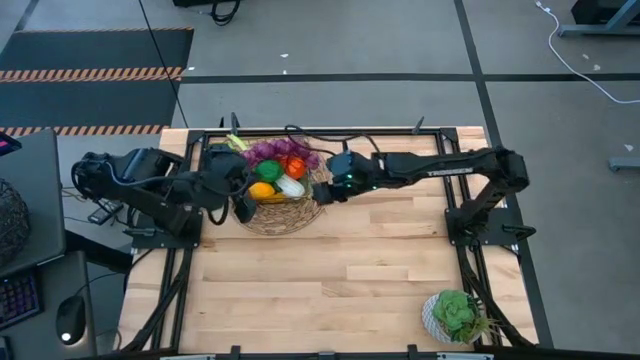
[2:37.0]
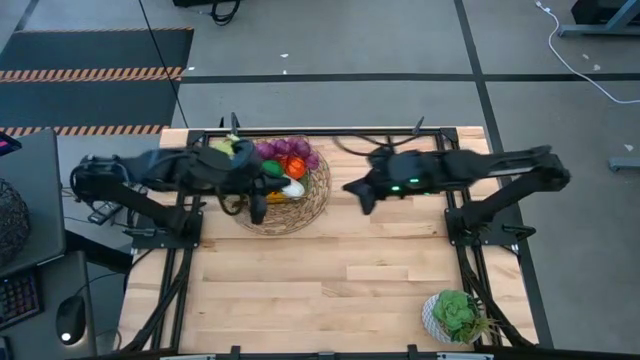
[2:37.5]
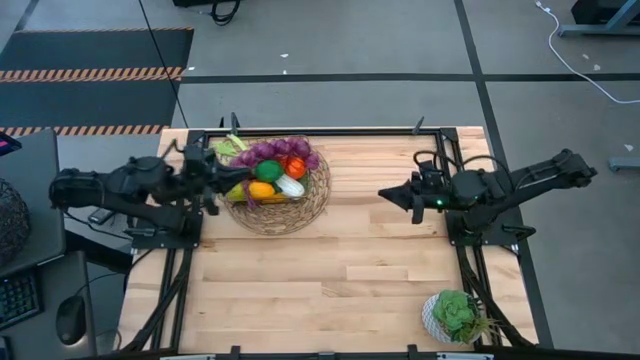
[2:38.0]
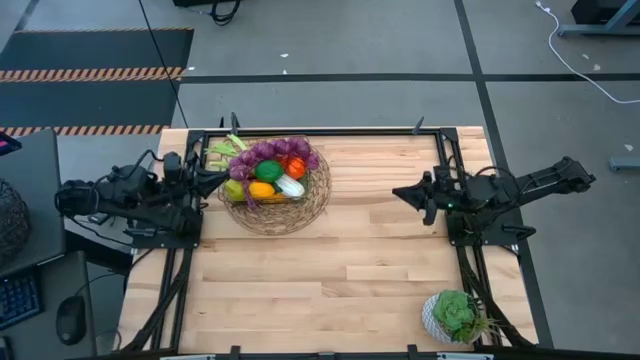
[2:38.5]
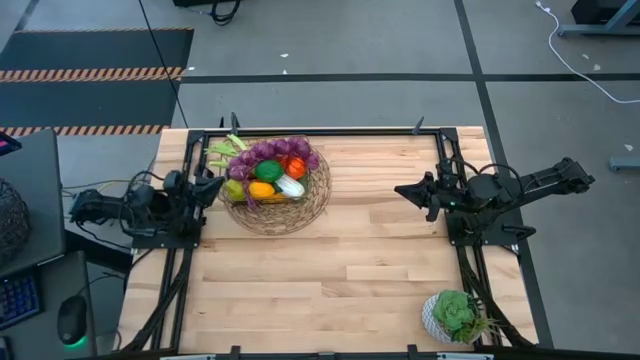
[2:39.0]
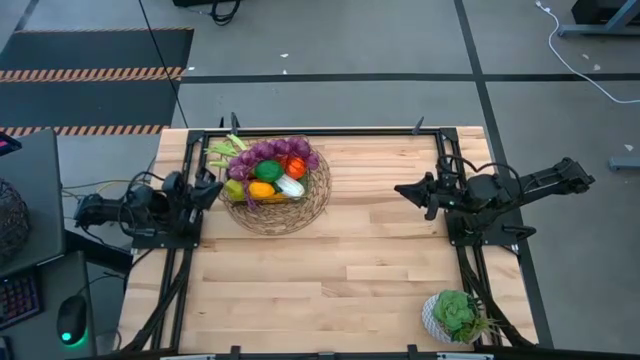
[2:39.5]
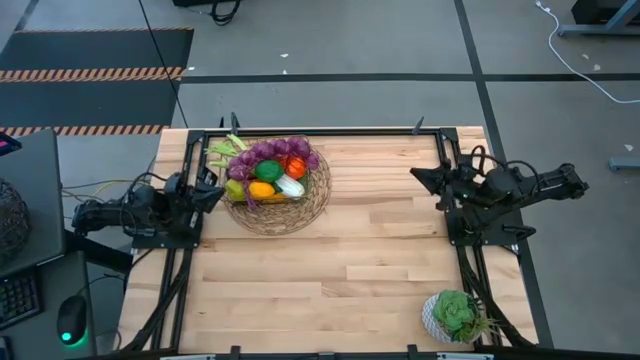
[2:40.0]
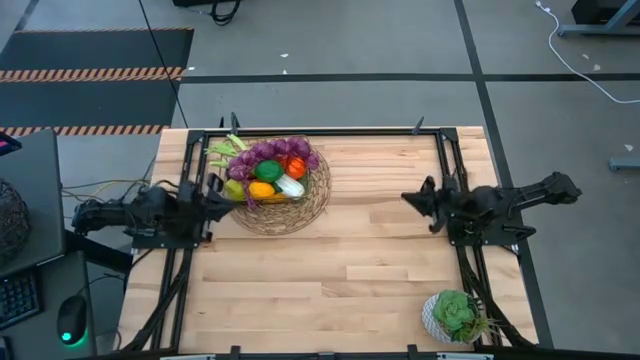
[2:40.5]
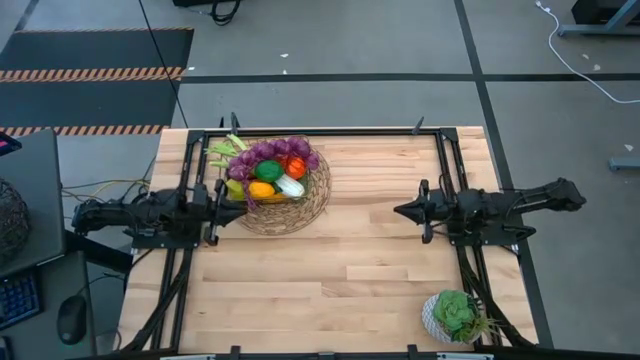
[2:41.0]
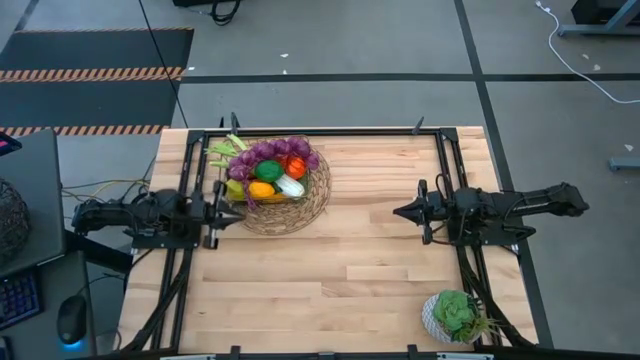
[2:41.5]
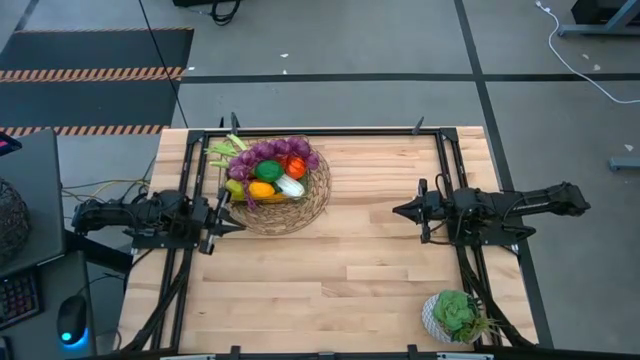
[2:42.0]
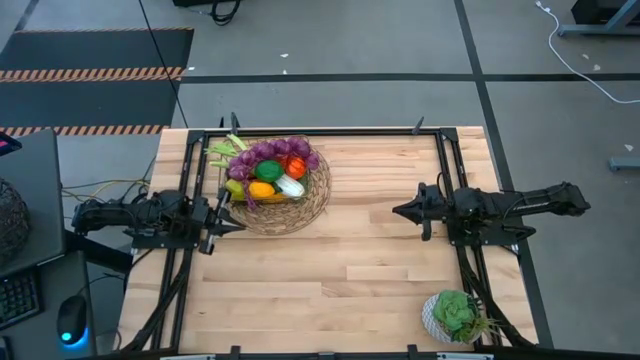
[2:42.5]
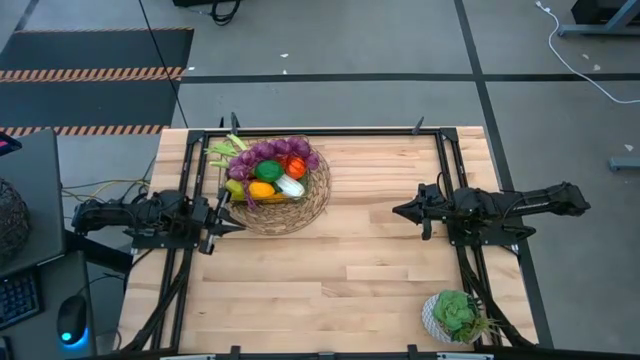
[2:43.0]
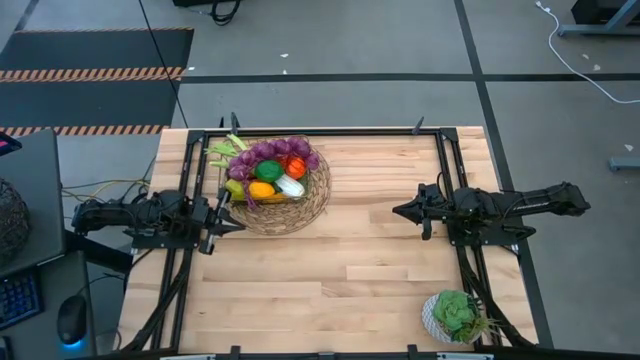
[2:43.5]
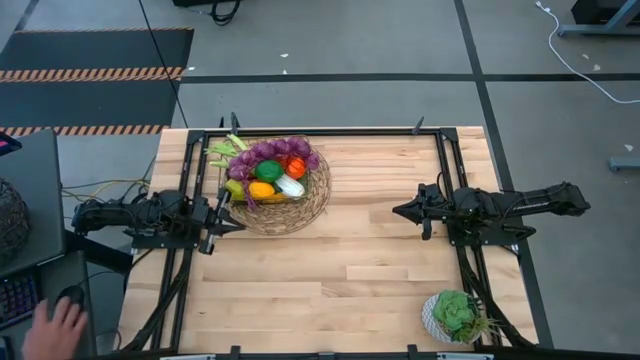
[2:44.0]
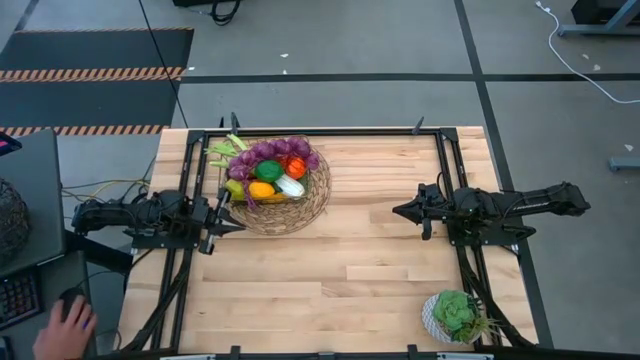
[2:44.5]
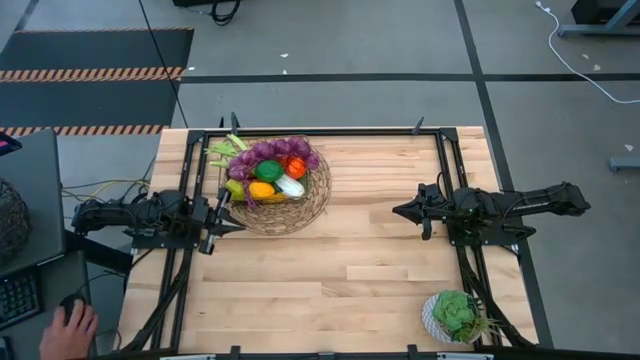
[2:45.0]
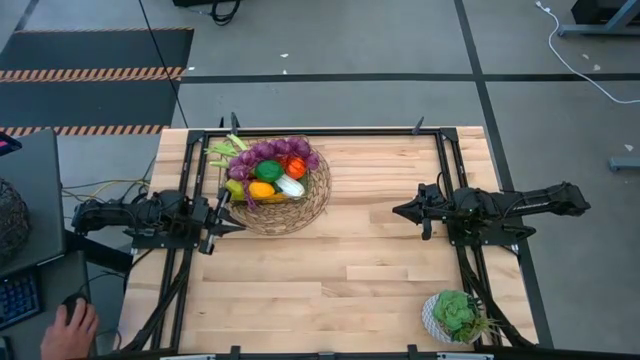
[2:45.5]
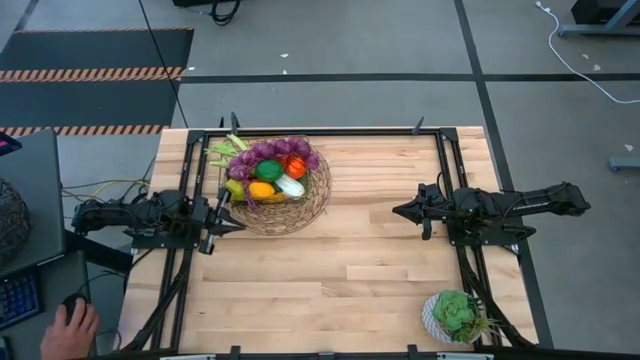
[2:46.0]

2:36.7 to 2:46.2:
Task: Build produce basket
Return to Home Position

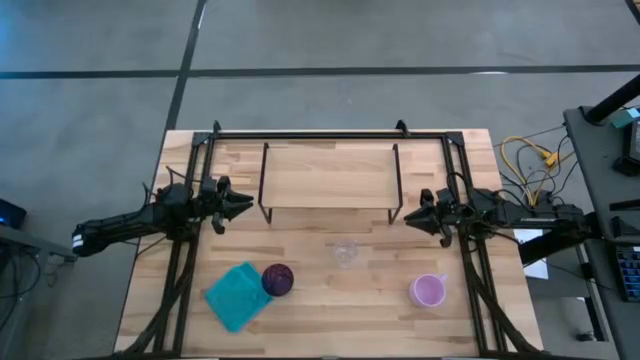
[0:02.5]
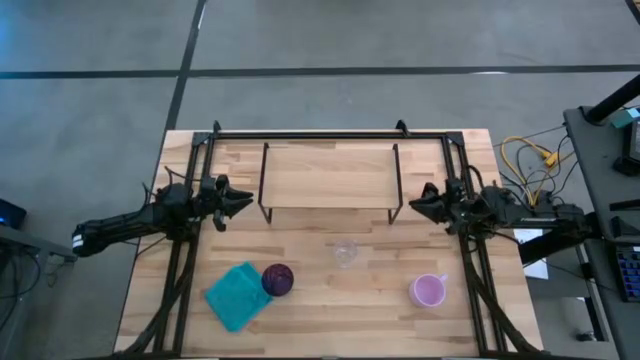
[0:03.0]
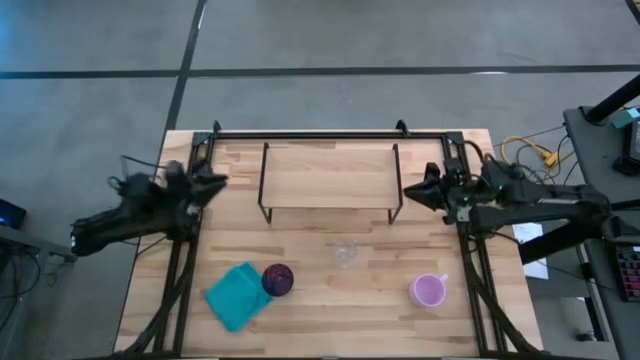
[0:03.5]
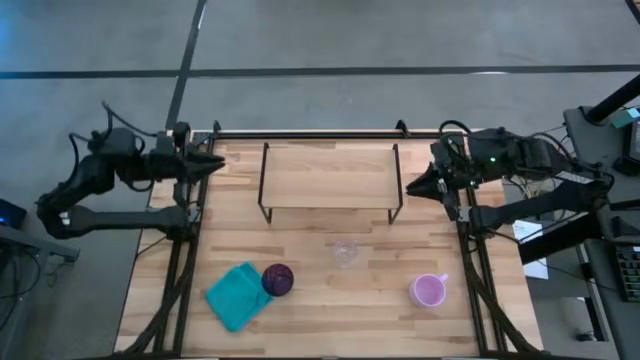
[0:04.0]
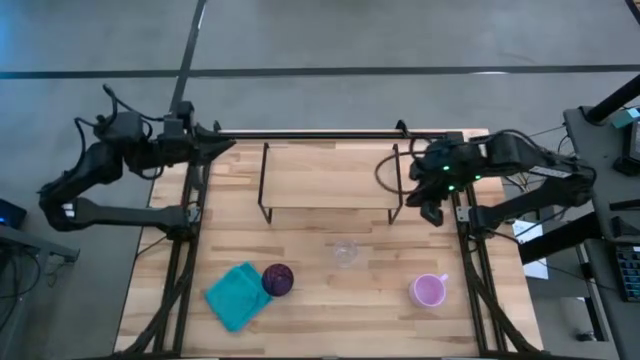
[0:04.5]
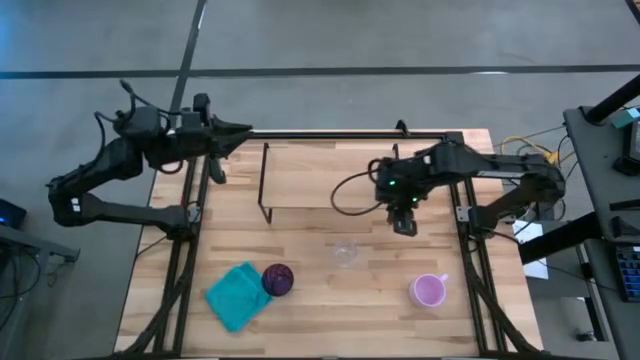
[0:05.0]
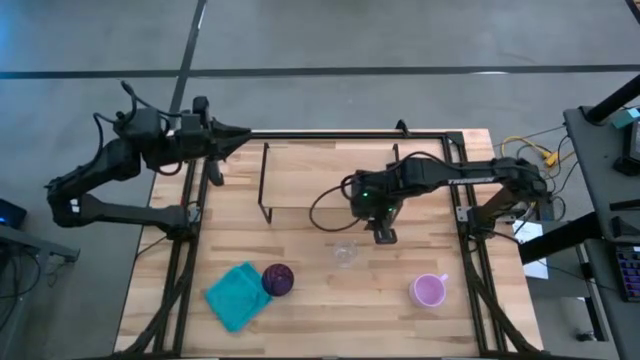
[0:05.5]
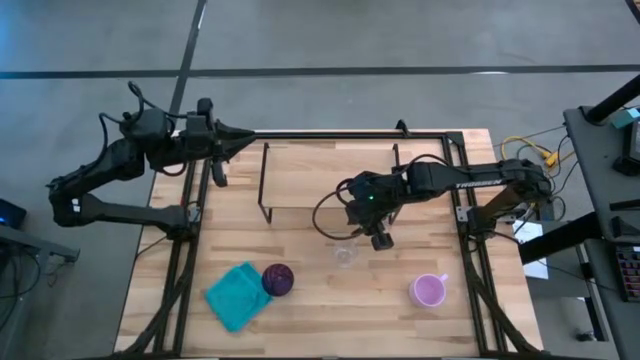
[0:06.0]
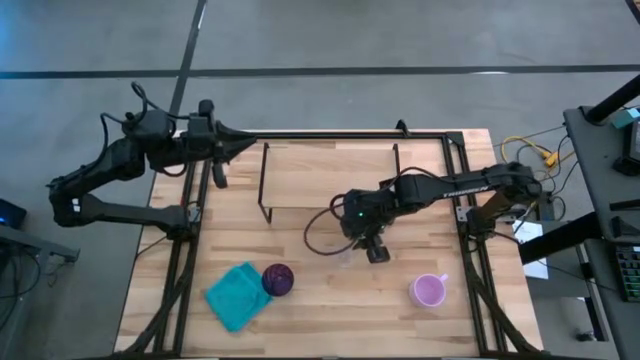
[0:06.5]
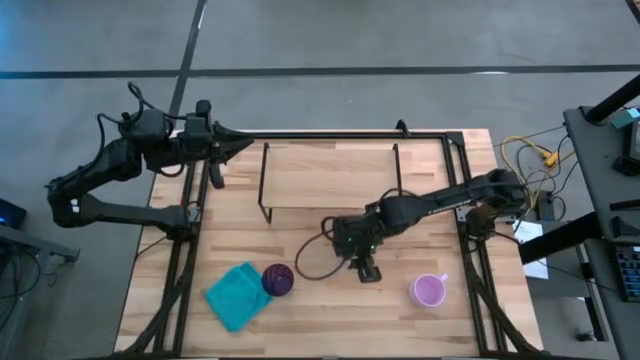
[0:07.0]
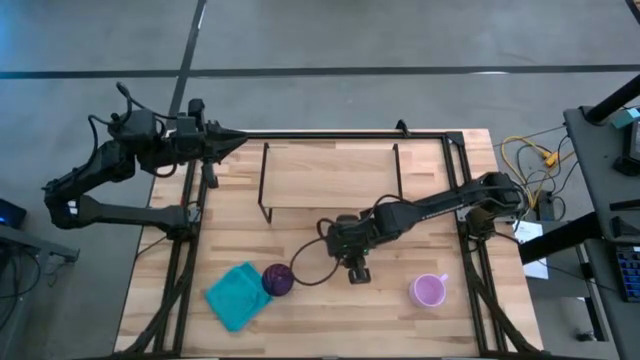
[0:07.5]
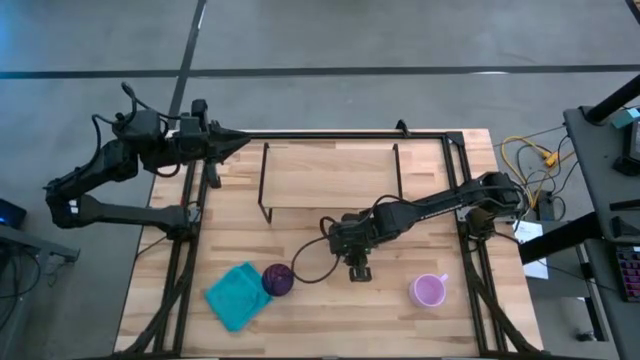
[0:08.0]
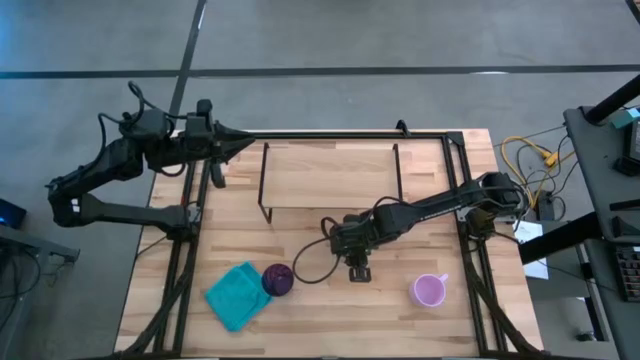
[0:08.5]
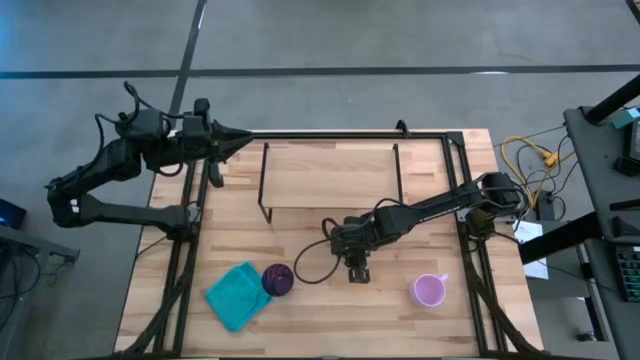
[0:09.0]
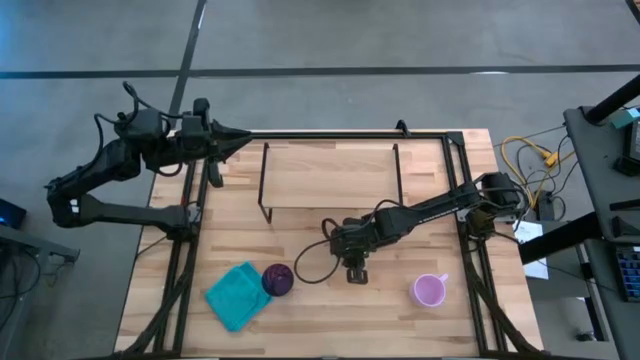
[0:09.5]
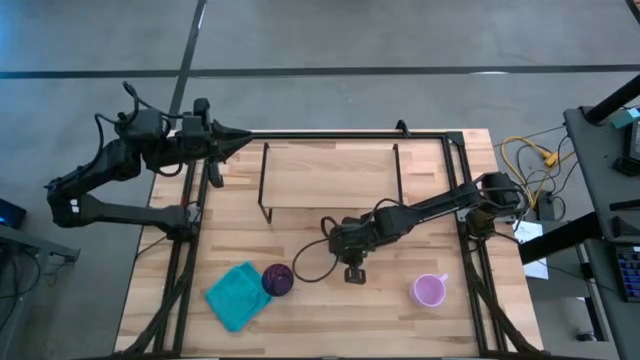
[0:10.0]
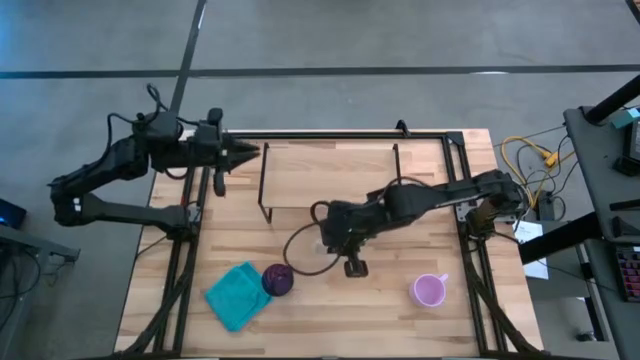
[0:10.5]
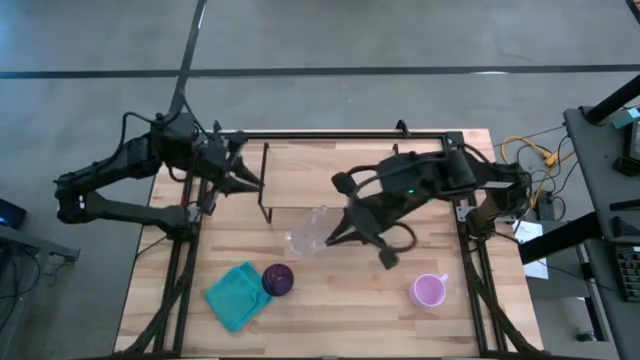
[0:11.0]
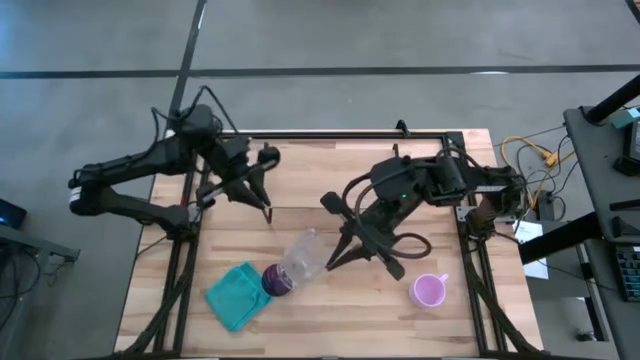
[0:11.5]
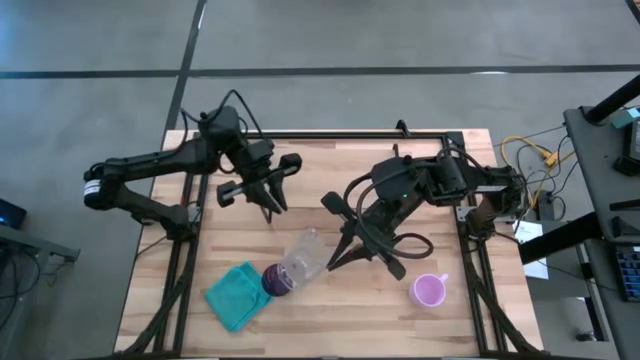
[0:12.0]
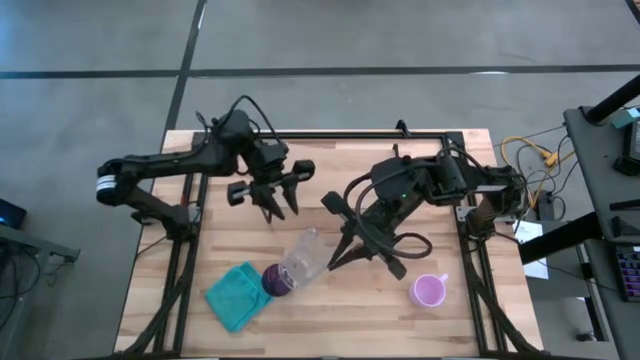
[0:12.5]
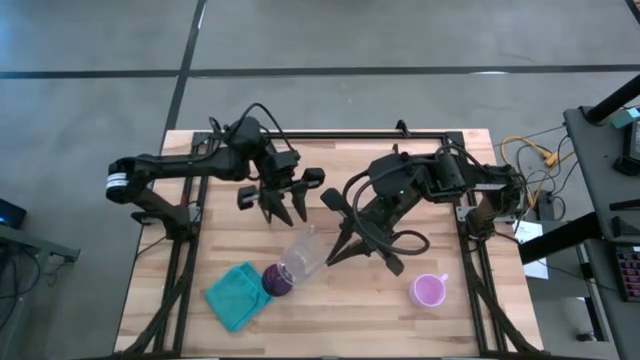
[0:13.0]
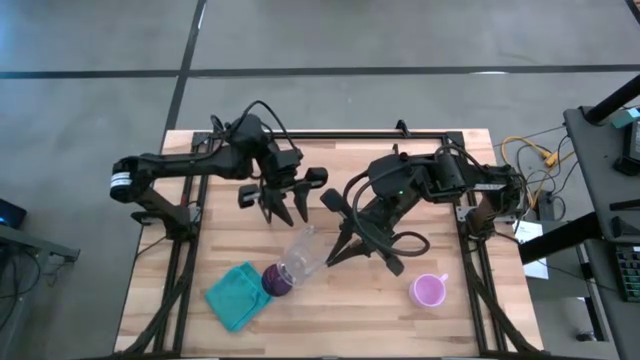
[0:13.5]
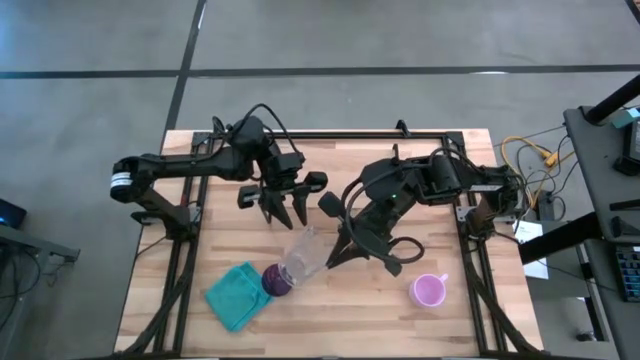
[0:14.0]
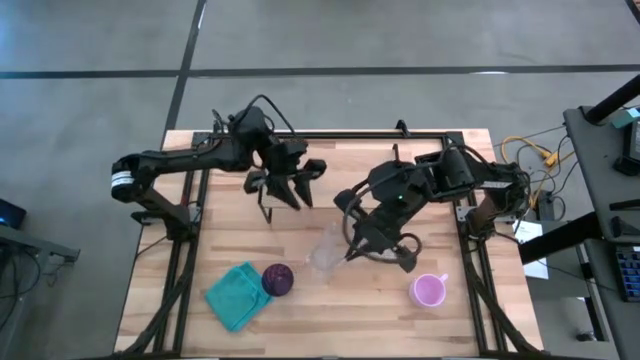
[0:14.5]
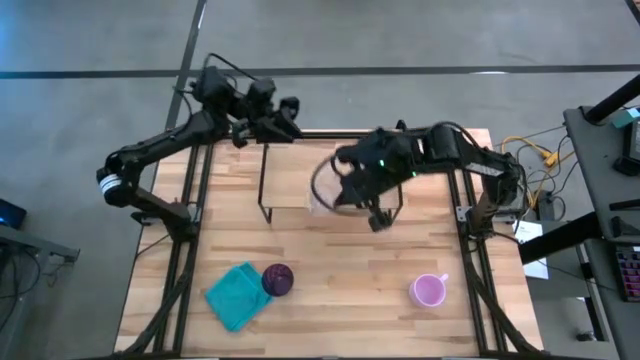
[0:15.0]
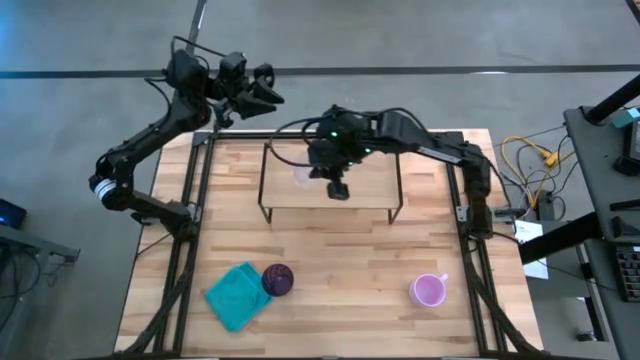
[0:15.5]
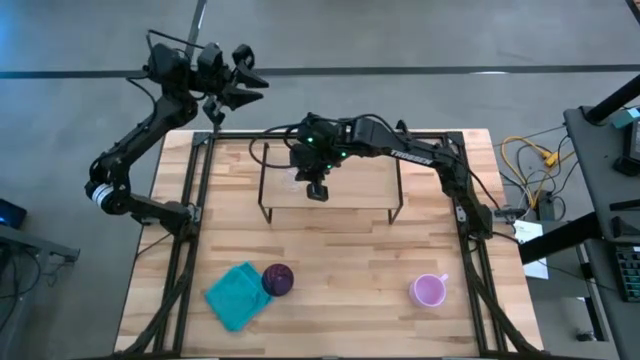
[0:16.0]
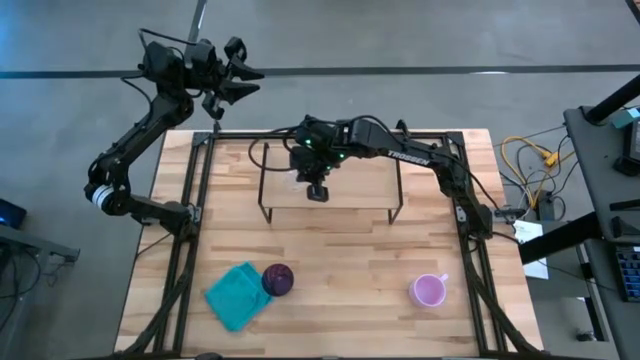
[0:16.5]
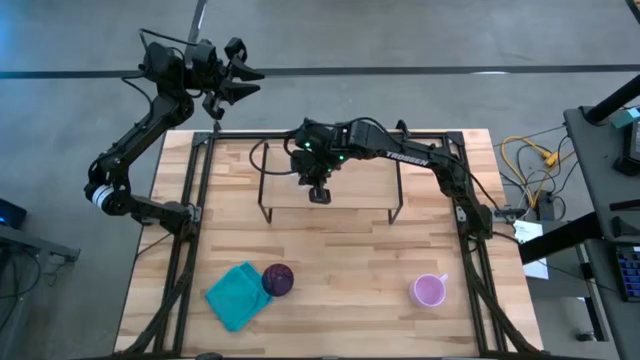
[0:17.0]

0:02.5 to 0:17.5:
Task: Stack small to large cups/mugs on shelf
Put the transparent mug on the shelf
